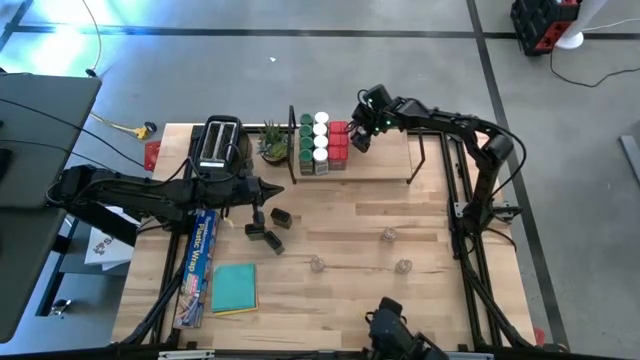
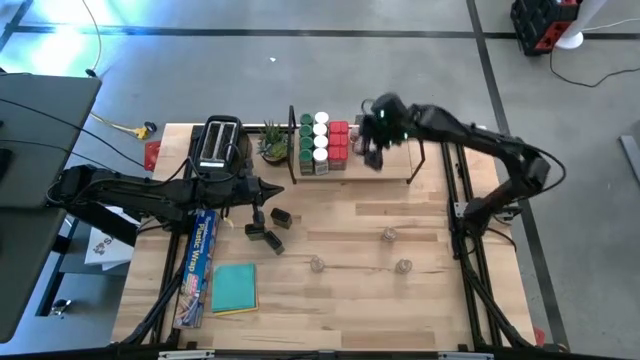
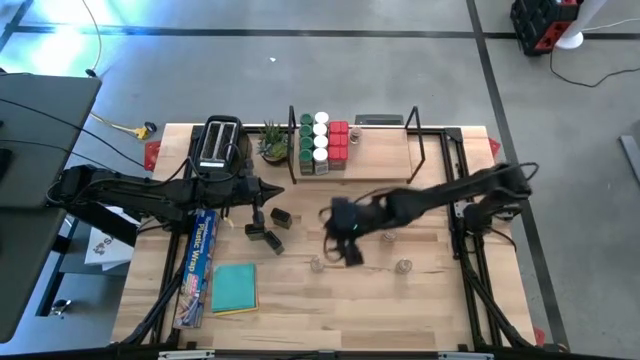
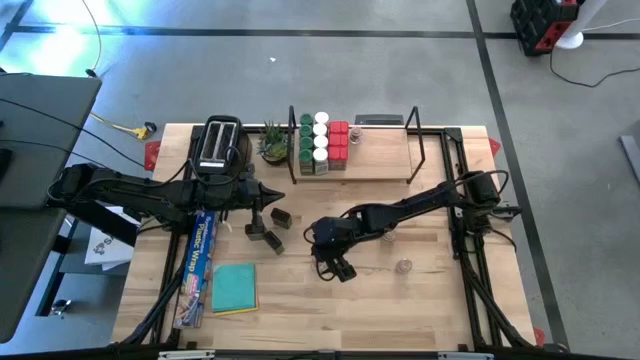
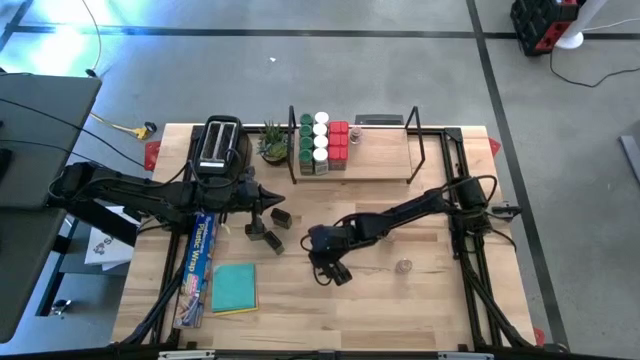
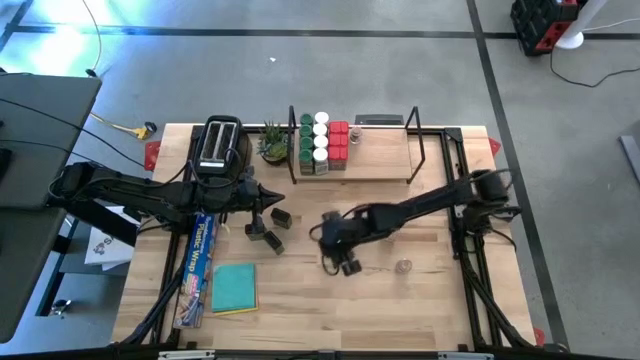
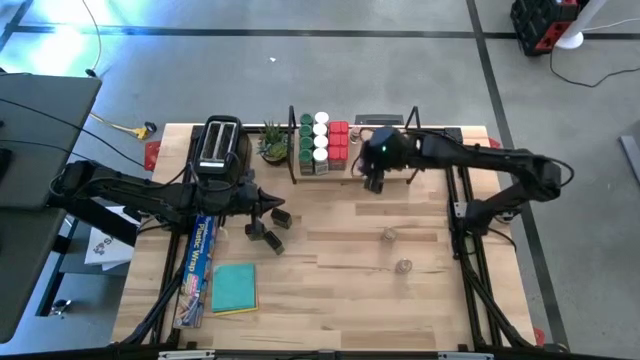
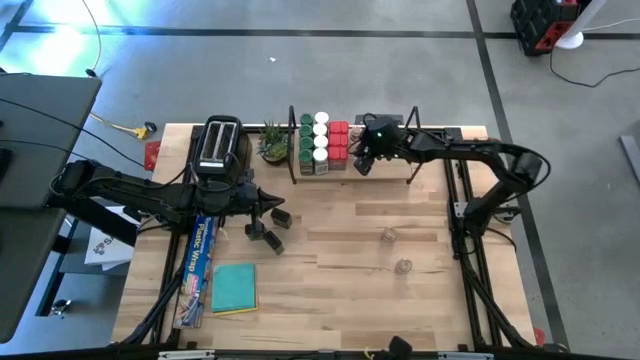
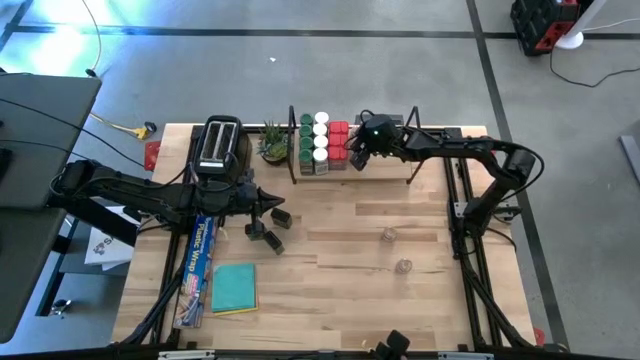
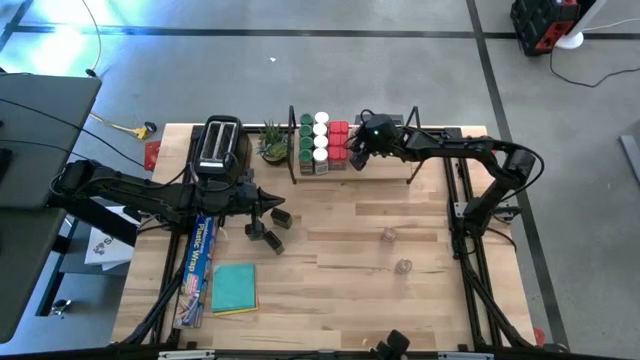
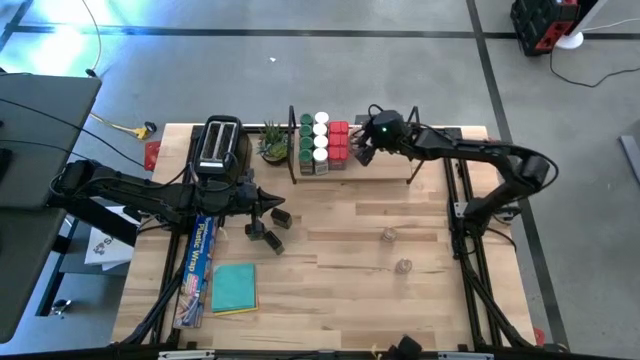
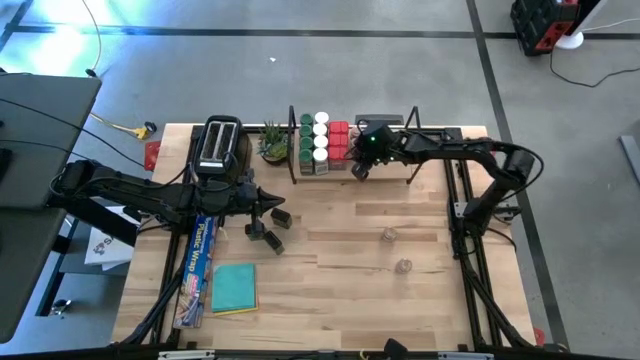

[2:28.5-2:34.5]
Task: Shelf spices
Put the bottom left brown seasoning bottle on the shelf aligned with the other brown seasoning bottle

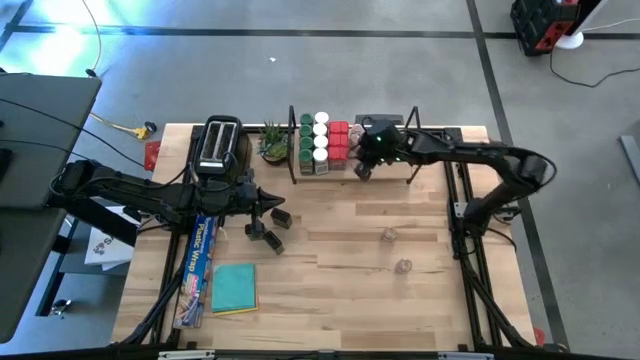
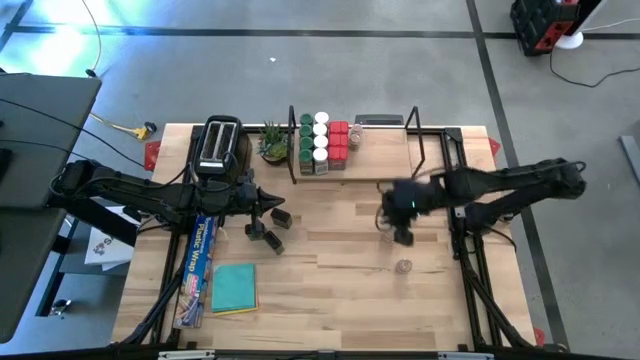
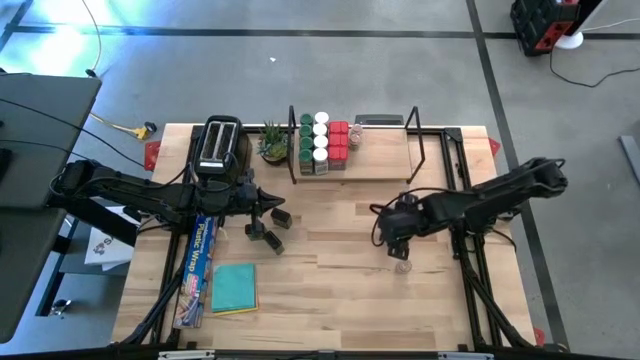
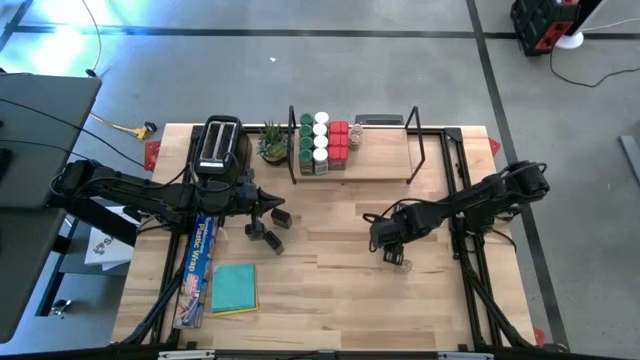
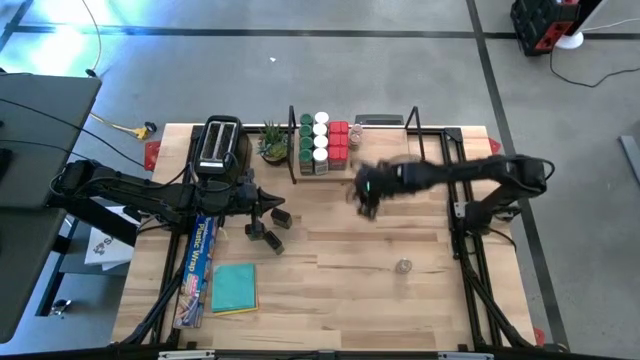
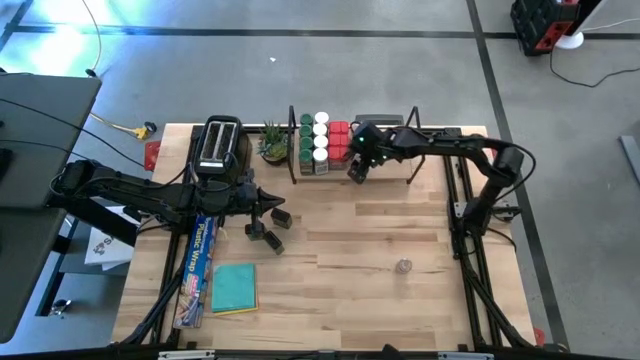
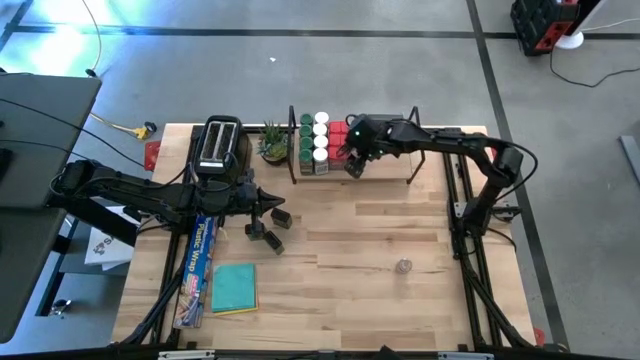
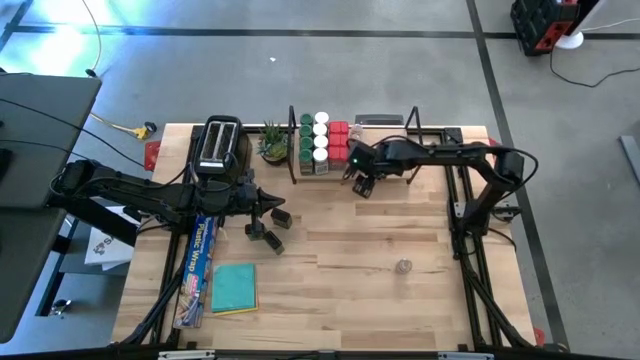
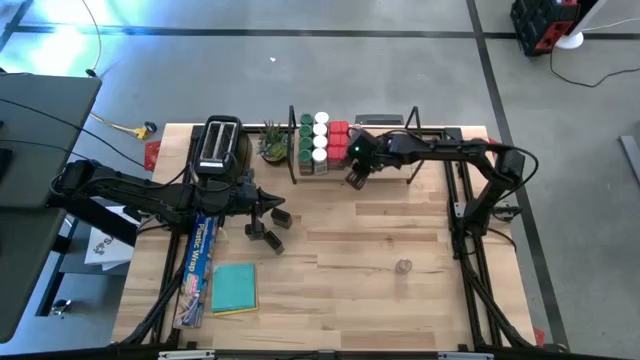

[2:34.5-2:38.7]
Put the top brown seasoning bottle on the shelf aligned with the other brown seasoning bottles

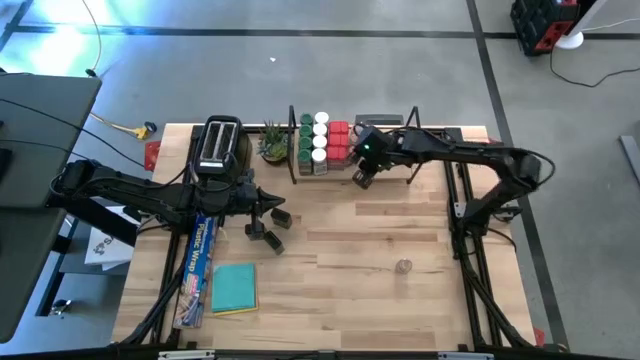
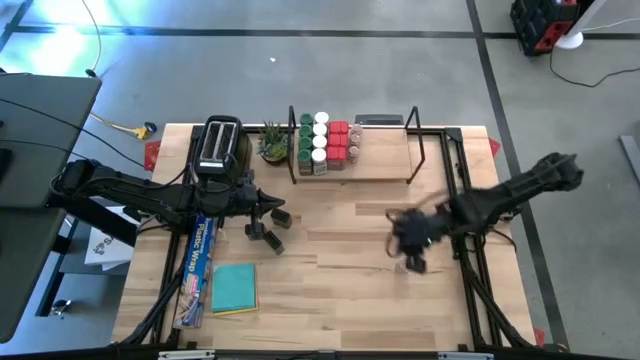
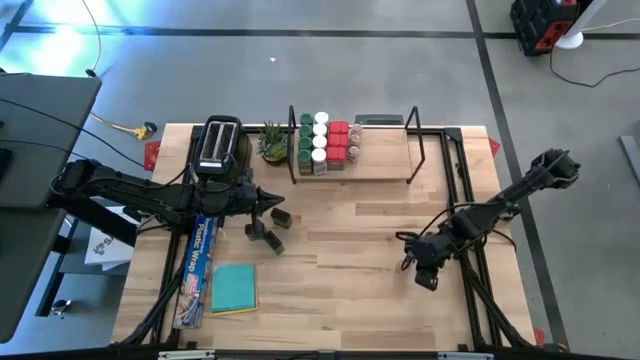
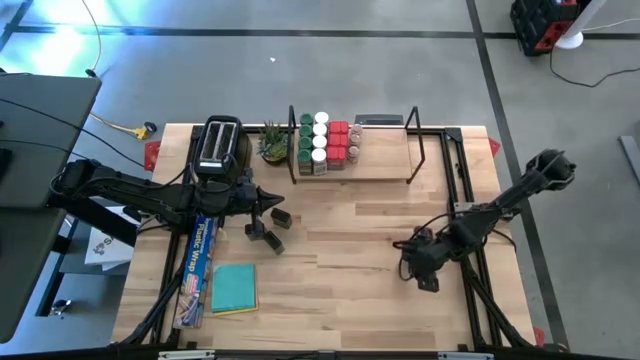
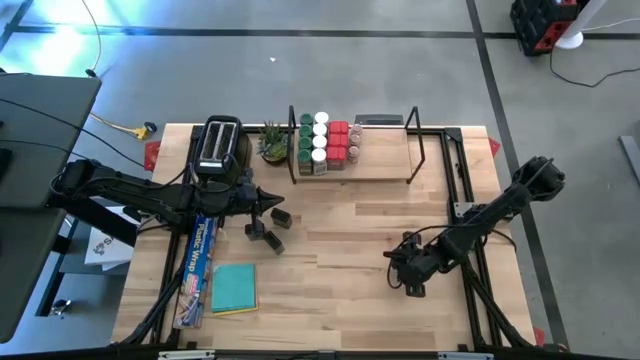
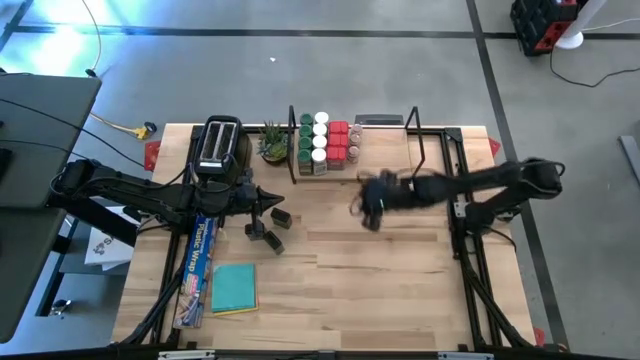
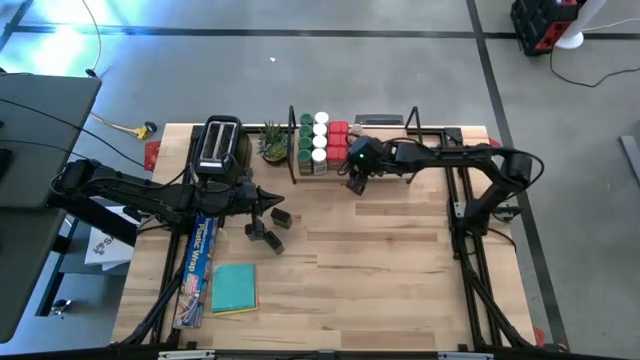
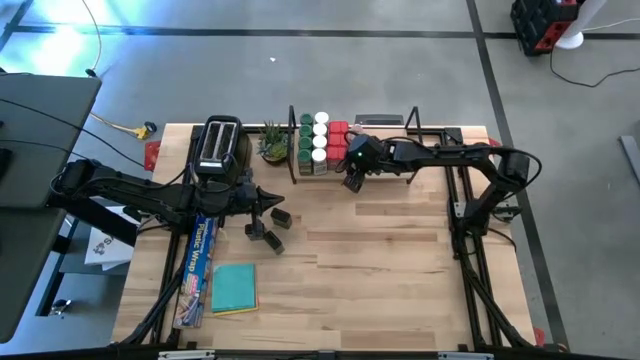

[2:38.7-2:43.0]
Put the brown seasoning bottle on the shelf aligned with the other brown seasoning bottles

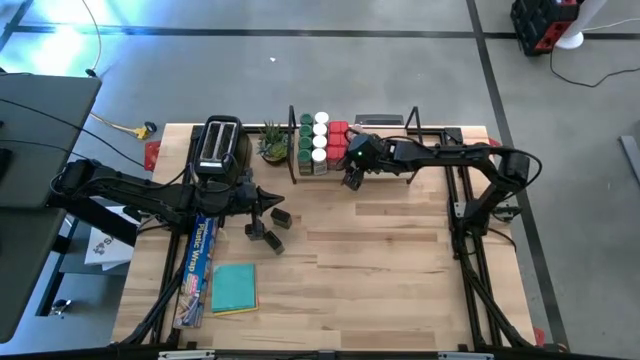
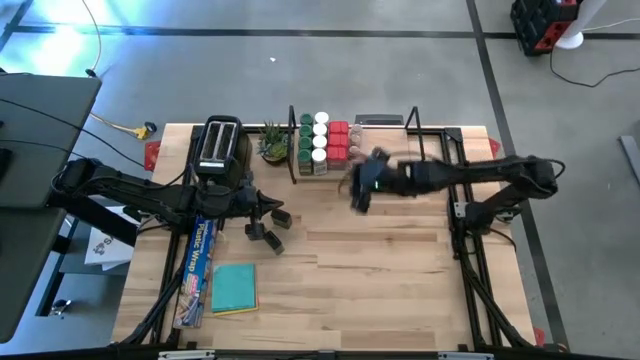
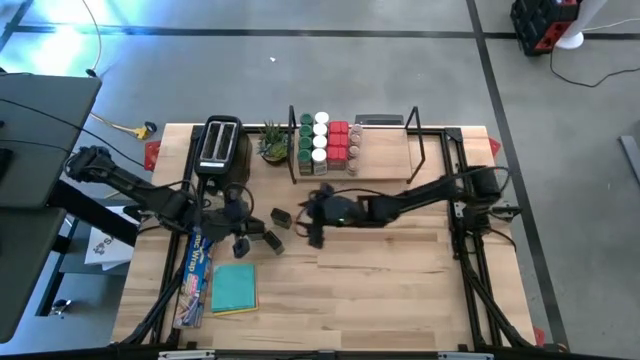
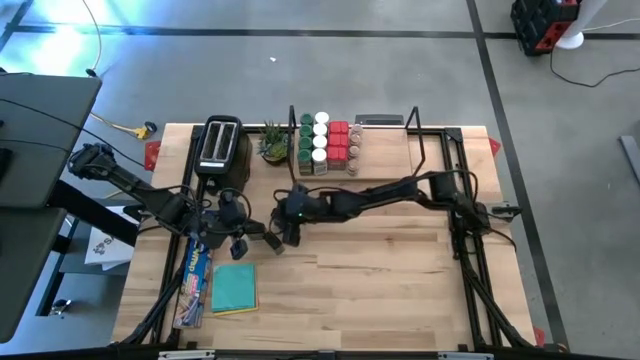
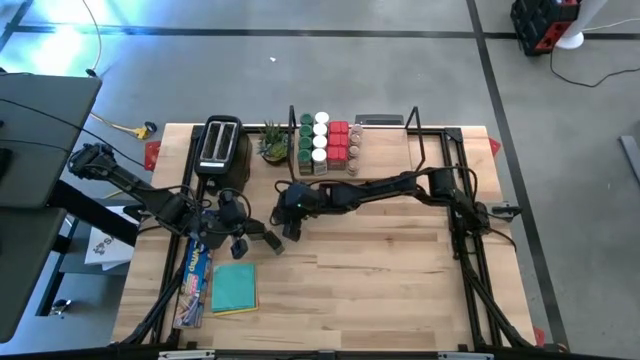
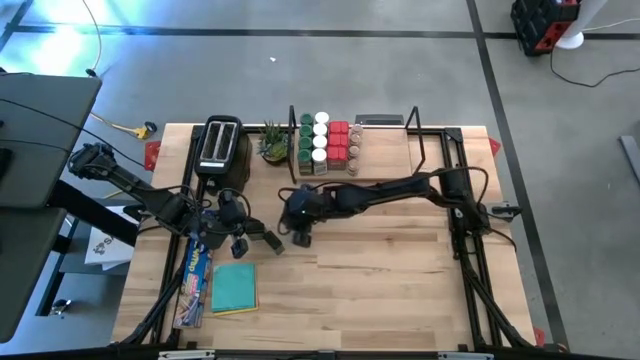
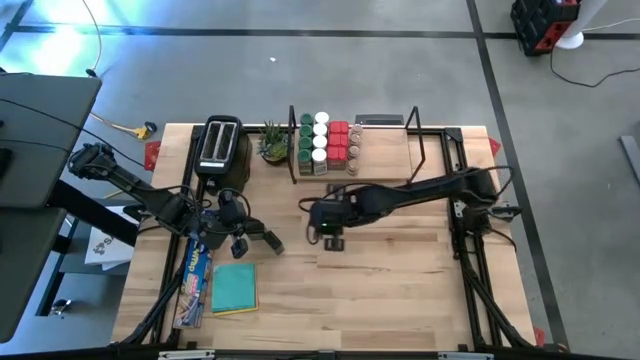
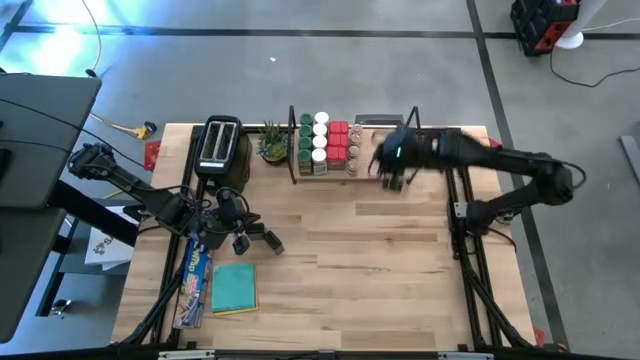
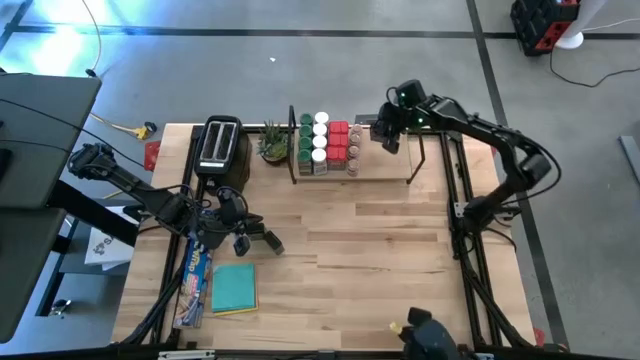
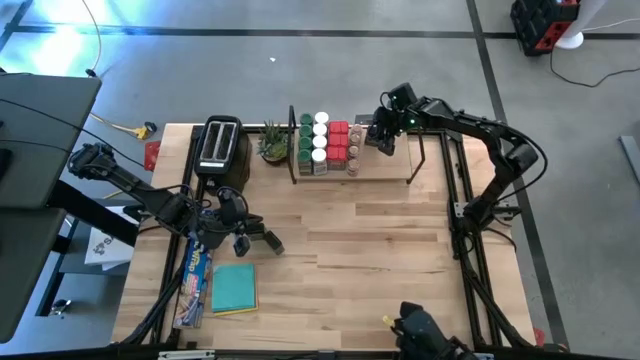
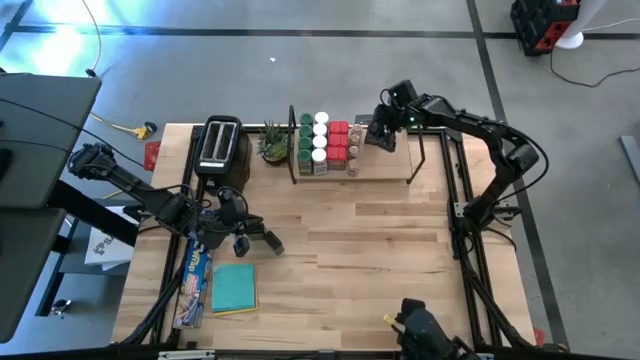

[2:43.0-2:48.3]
Put the top black seasoning can on the shelf

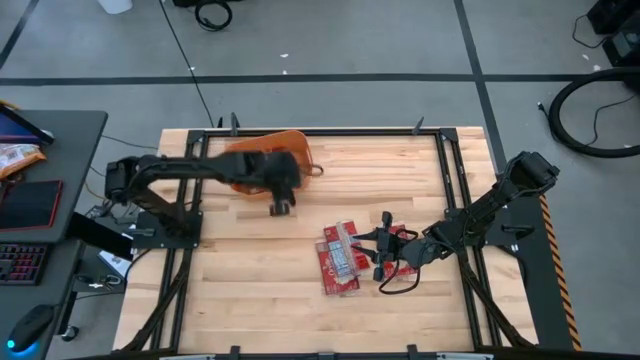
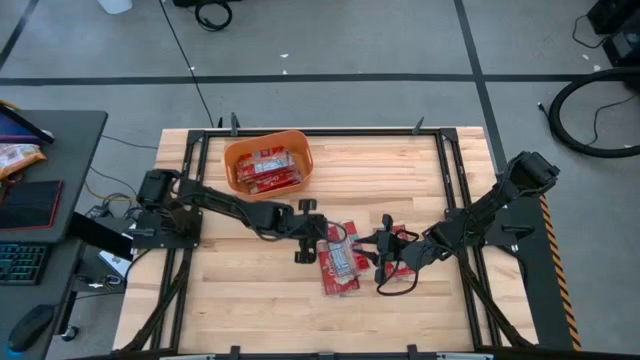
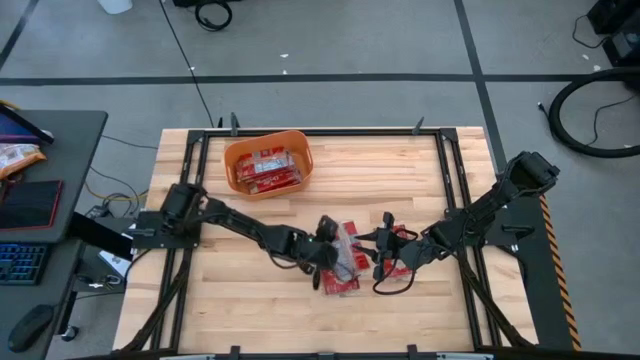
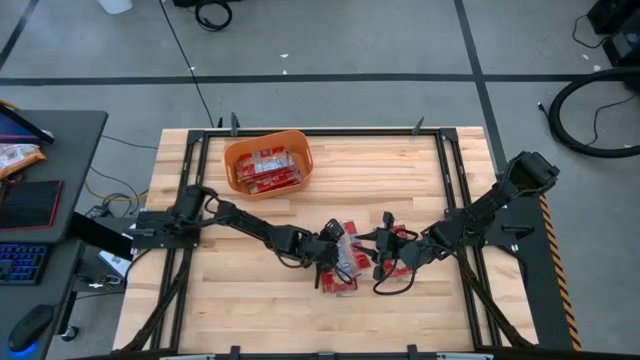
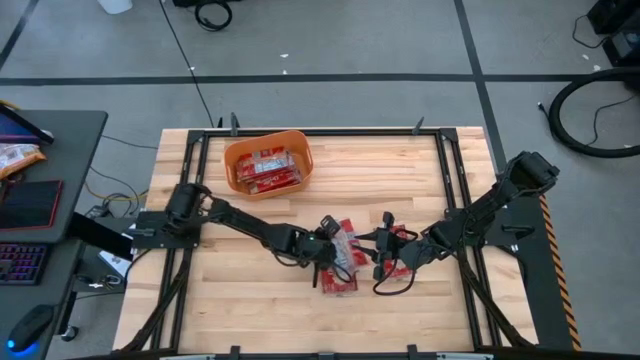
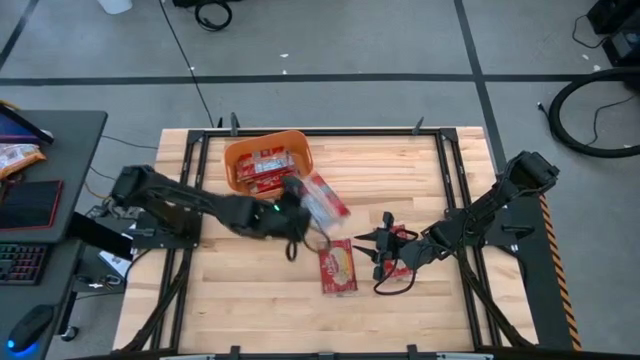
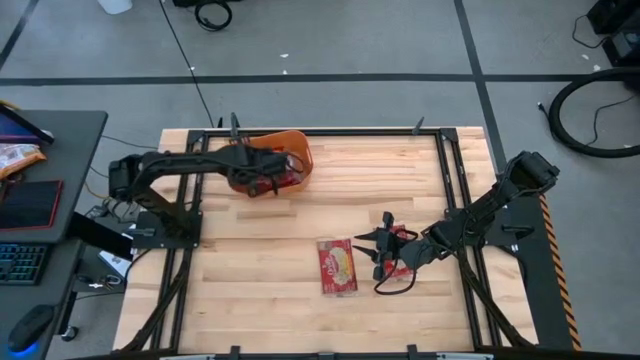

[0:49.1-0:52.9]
Task: Sort popcorn bags into baskets
Put the red popcorn bag into the orange bin
